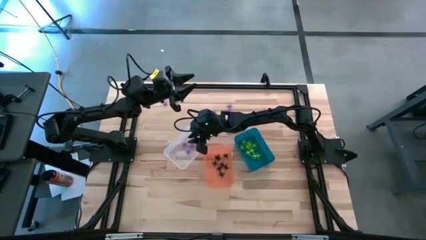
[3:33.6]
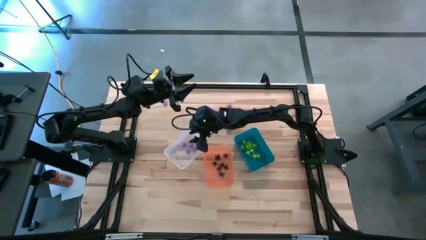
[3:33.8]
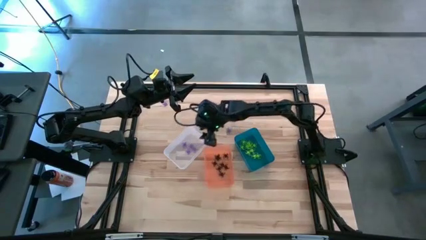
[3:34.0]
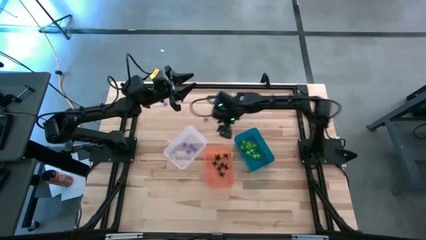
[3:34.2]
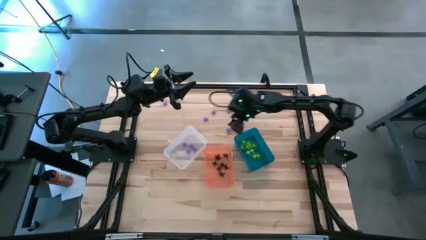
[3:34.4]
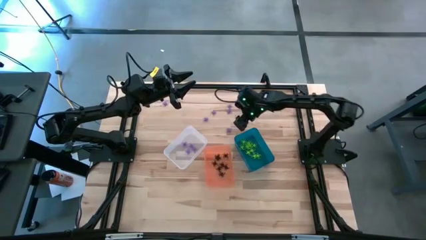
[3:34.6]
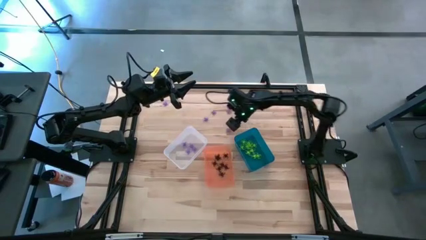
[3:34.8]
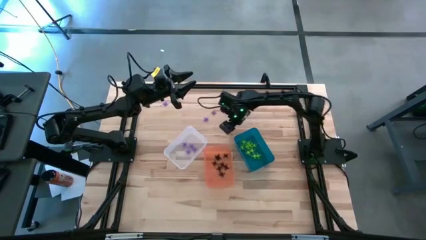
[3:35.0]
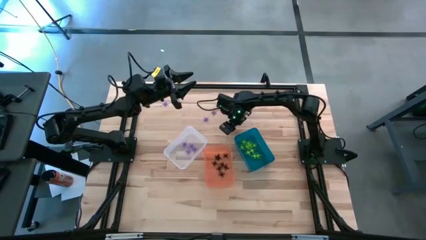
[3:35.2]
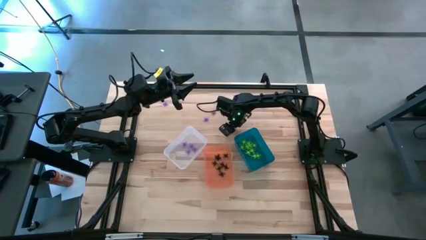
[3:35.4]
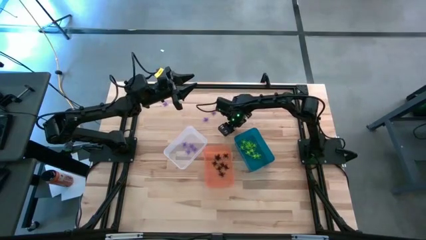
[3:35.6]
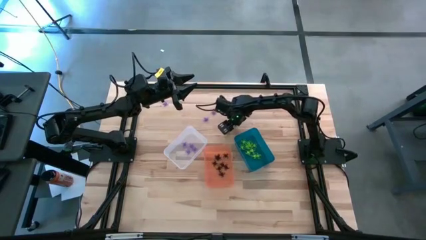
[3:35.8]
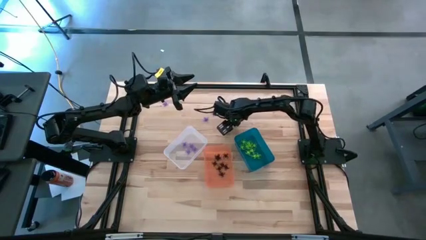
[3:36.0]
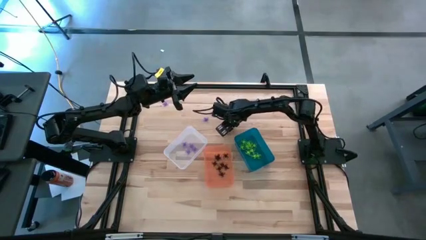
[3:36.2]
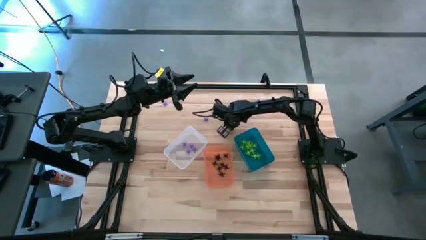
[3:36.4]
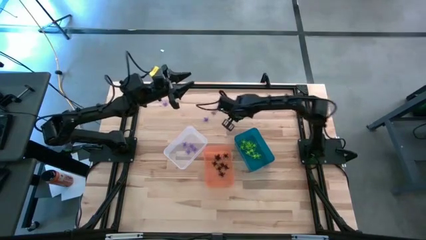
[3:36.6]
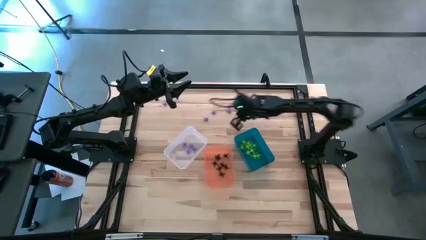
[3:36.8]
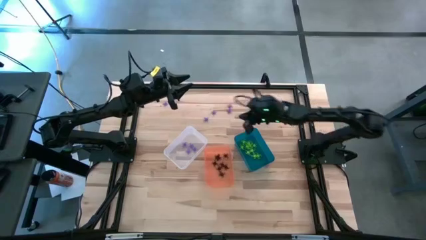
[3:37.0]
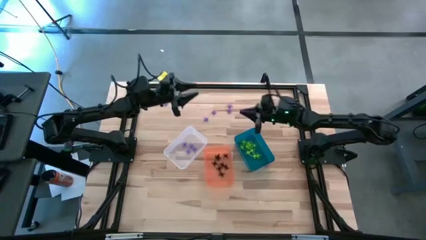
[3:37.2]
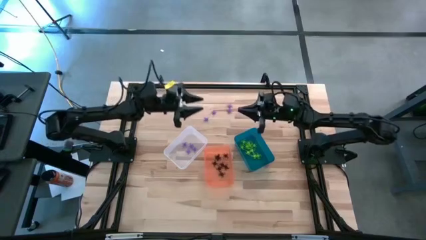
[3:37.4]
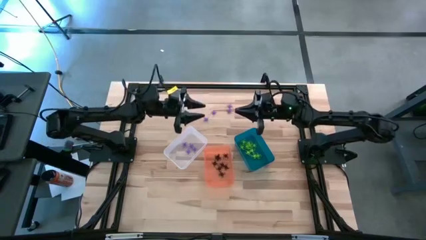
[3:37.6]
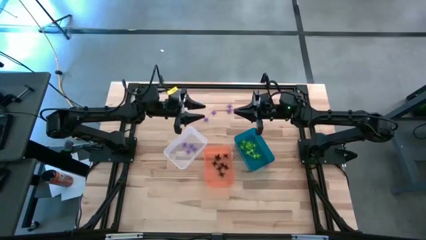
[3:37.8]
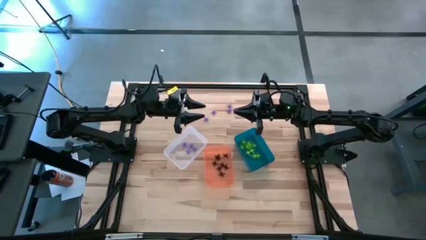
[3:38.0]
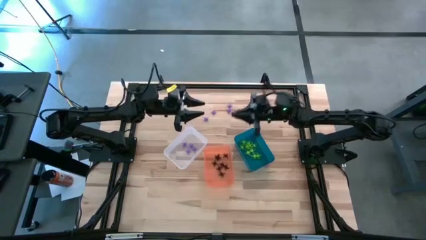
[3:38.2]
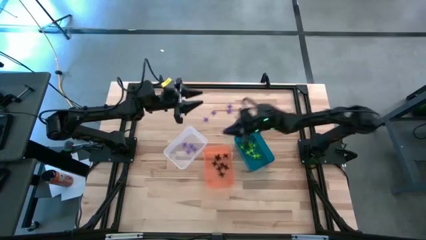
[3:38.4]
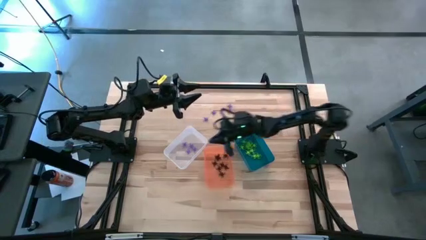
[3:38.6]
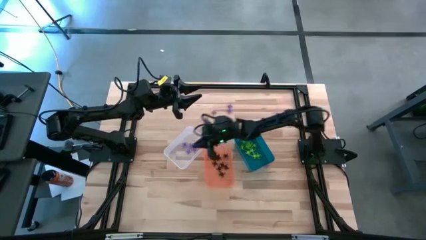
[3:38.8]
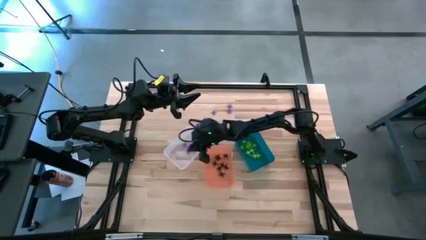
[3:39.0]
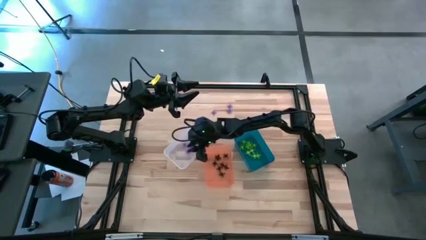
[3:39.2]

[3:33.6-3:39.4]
Task: Sort Halloween decoration
Put the purple spider toy into the transparent bin

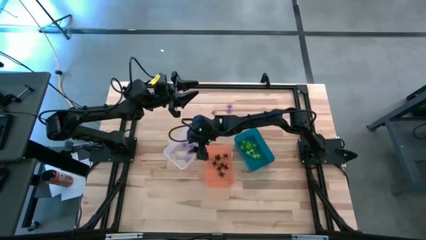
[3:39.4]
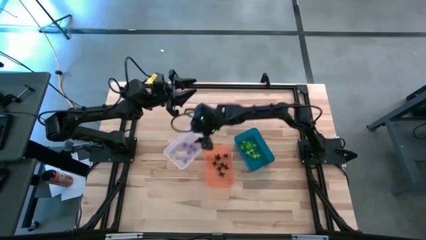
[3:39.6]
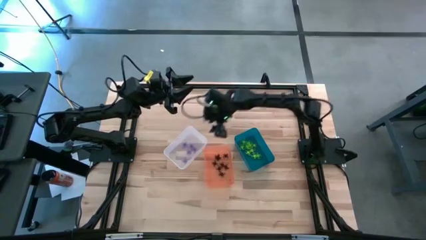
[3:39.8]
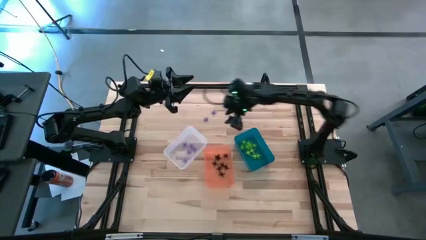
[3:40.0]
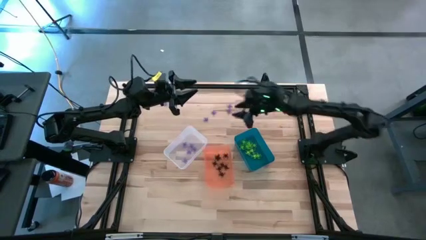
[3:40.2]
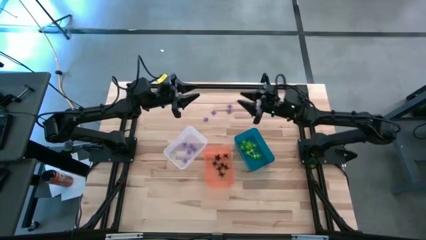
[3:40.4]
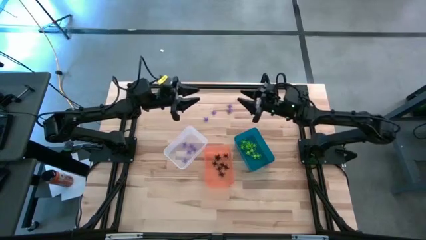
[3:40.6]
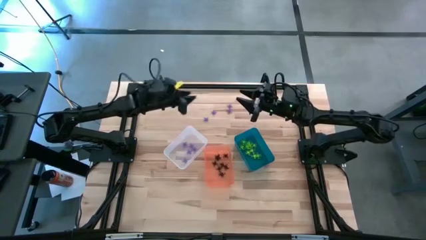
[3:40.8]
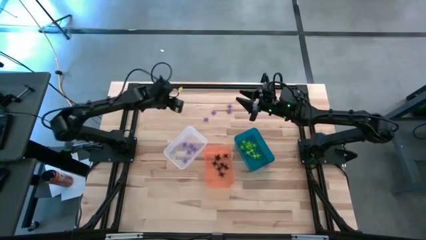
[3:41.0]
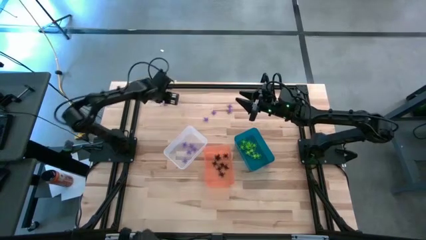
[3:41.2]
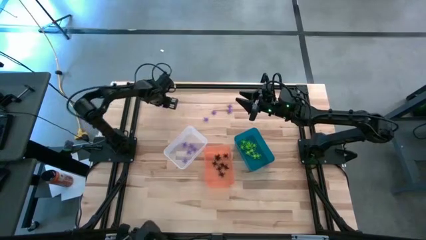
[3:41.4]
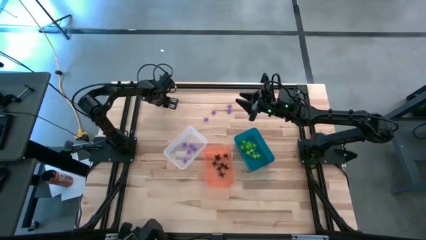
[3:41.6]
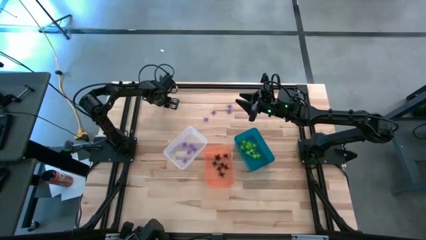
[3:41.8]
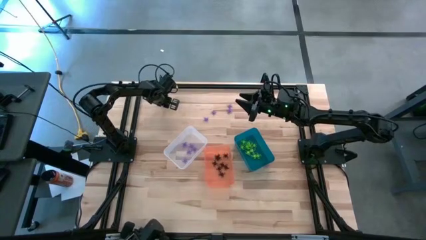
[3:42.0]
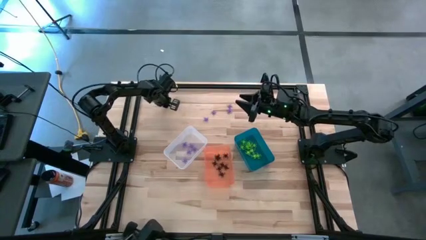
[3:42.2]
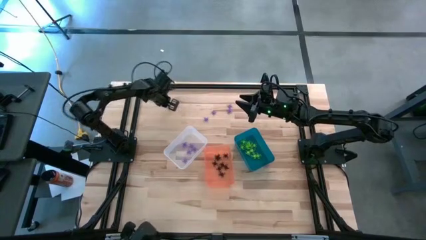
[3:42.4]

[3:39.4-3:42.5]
Put the purple spider toy into the transparent bin

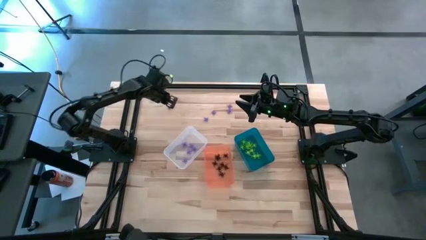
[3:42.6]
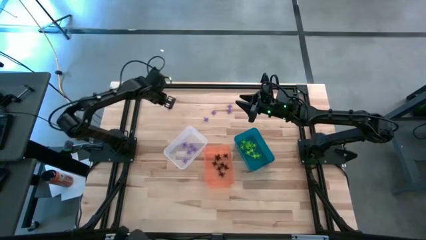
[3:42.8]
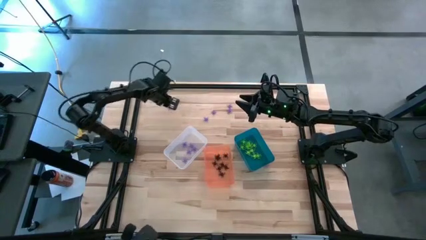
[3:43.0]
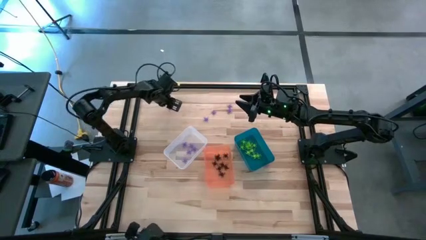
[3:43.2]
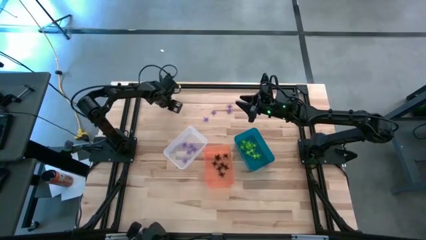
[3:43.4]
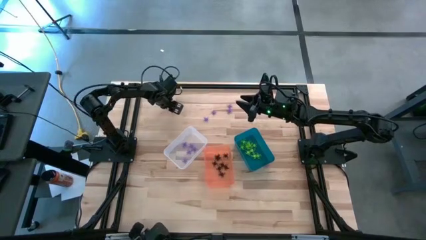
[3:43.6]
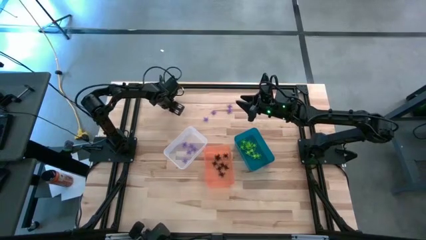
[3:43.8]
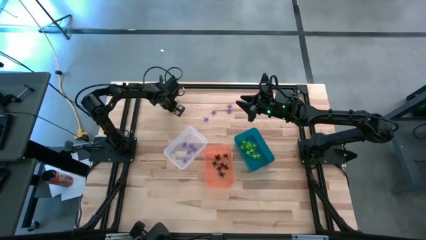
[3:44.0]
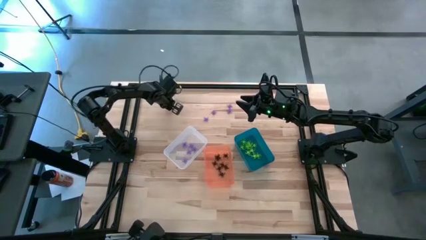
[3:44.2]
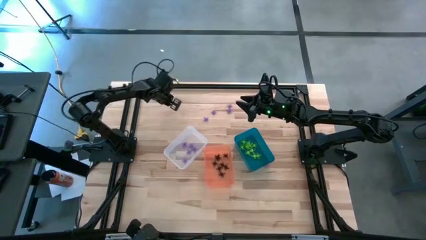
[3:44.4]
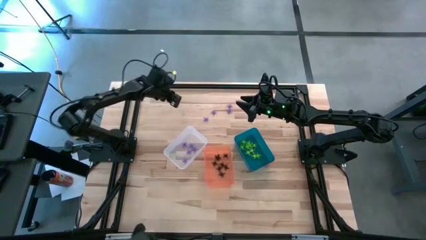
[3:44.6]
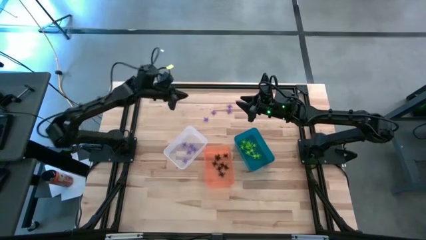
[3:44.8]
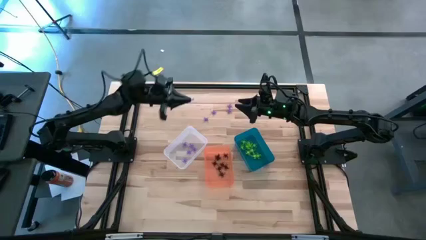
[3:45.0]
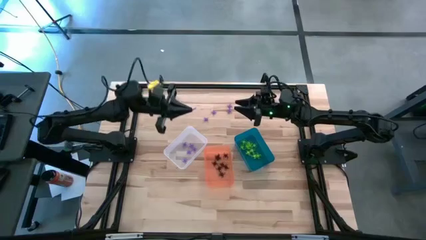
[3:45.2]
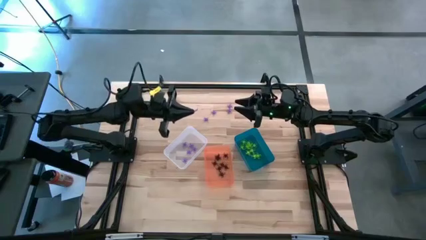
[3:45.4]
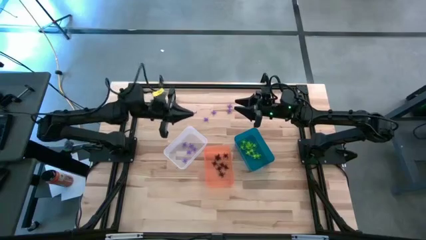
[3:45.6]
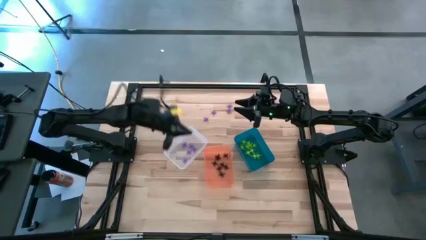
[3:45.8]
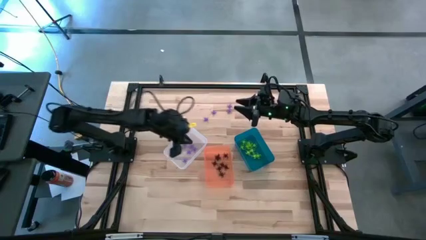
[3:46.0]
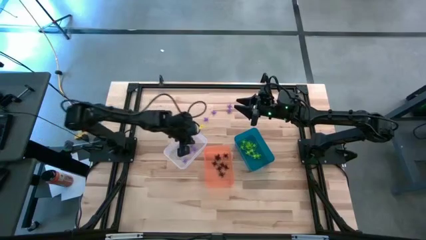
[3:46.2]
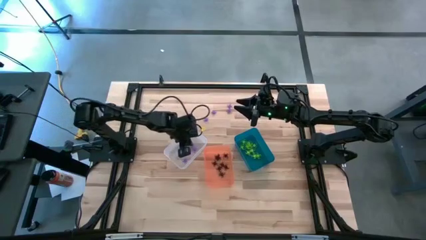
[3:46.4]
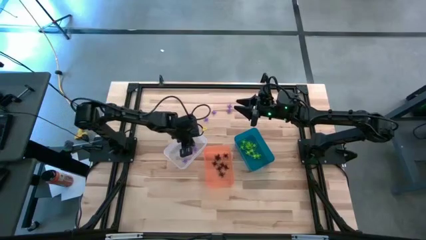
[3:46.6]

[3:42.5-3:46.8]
Put the purple spider toy into the transparent bin

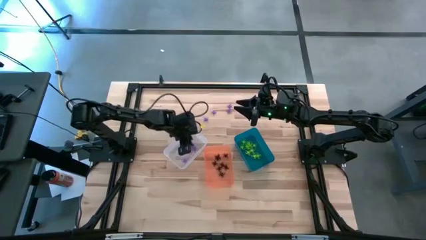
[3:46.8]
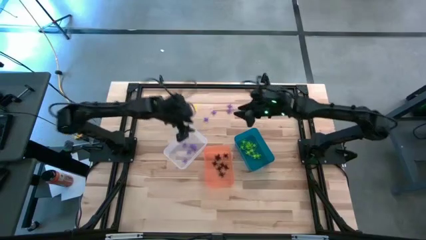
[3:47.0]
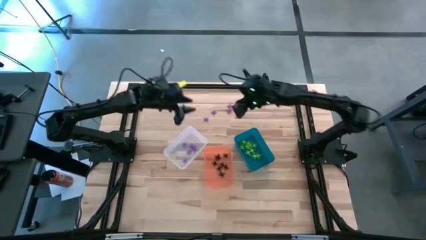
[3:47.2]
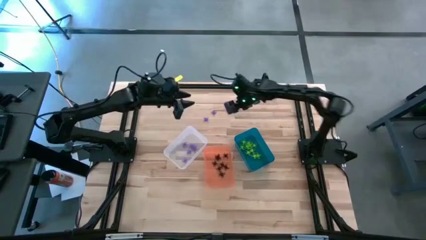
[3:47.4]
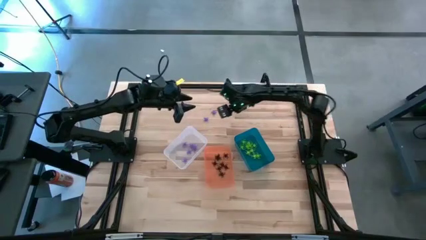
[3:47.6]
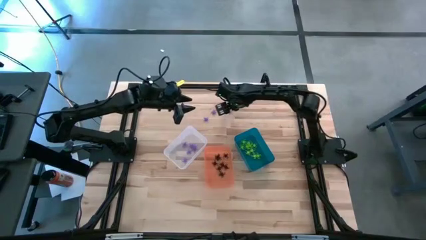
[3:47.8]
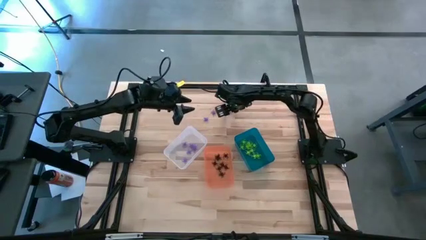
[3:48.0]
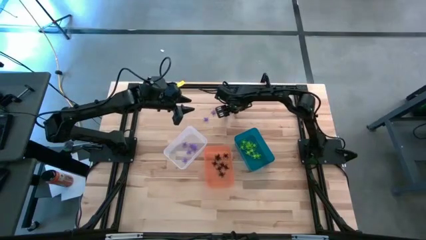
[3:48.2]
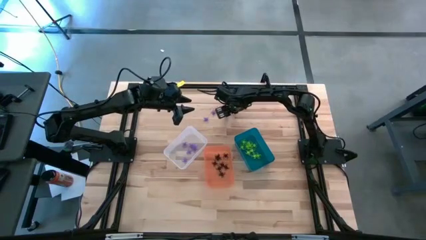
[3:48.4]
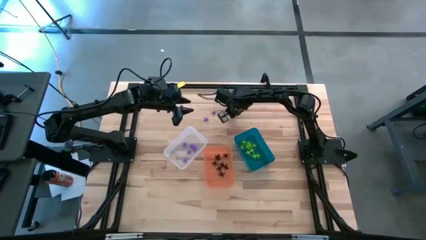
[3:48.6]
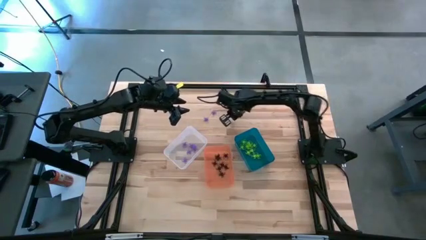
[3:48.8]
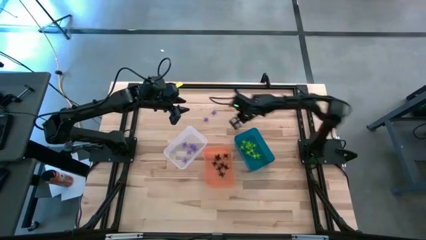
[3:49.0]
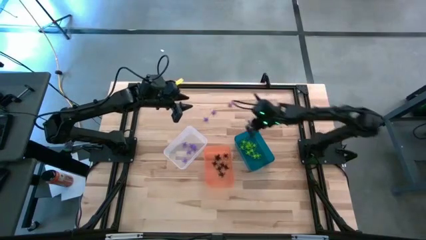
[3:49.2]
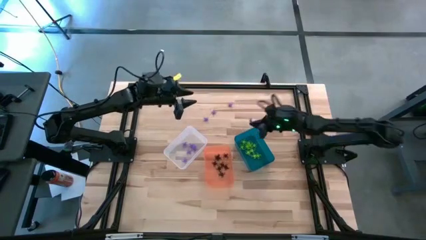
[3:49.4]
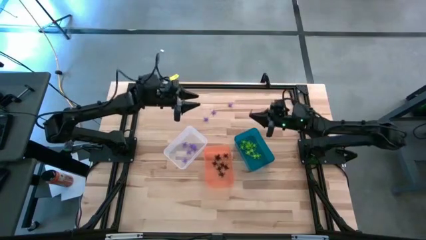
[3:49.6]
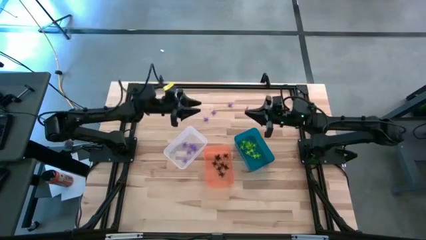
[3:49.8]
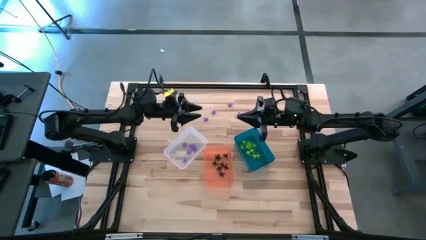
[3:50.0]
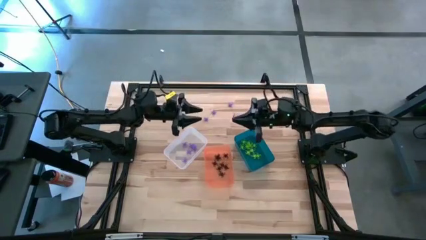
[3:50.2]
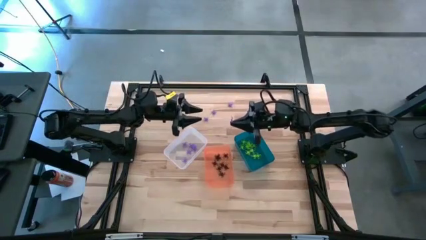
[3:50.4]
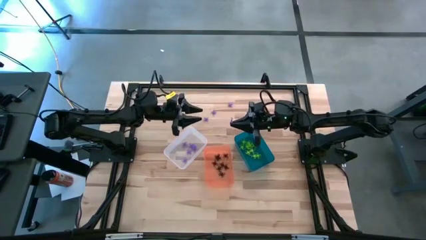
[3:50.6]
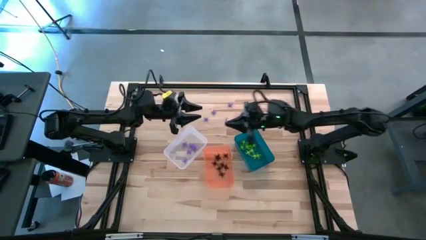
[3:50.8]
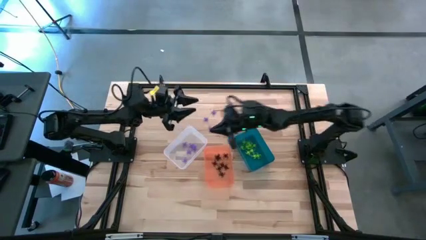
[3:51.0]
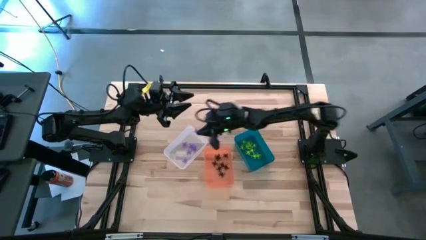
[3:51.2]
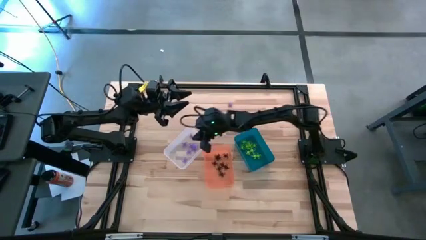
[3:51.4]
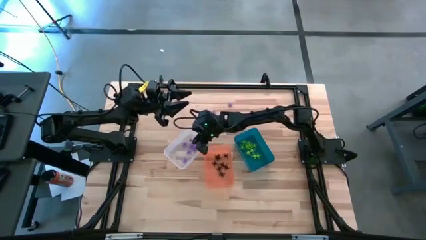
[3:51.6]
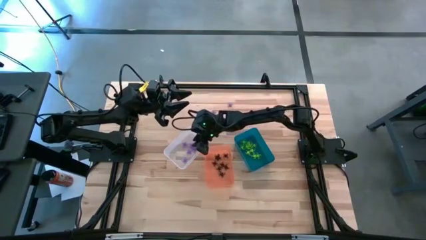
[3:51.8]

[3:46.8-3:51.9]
Put the purple spider toy into the transparent bin
